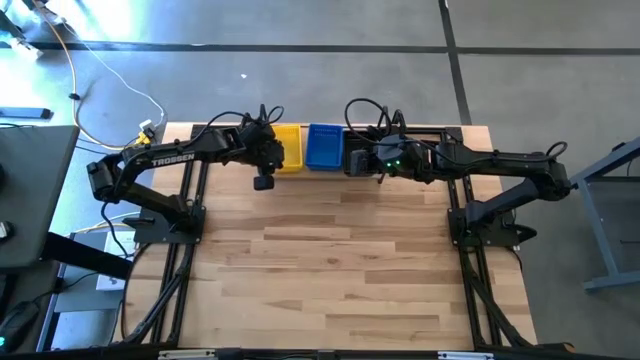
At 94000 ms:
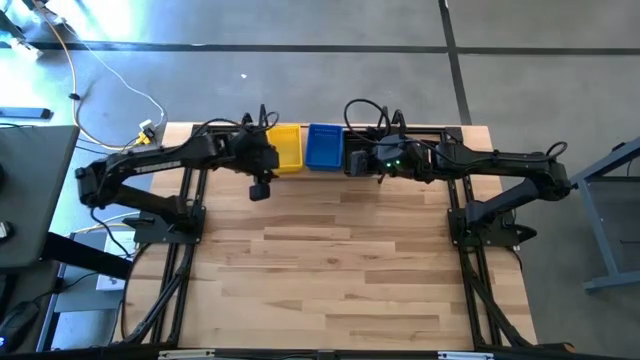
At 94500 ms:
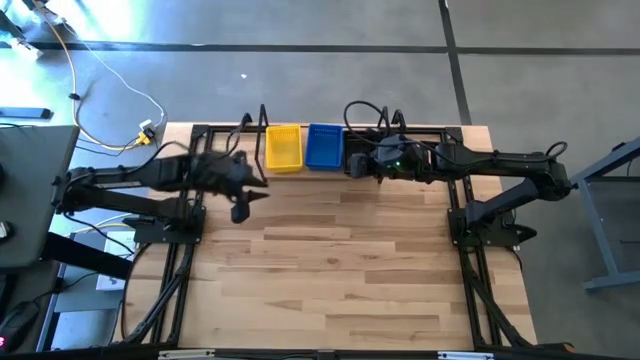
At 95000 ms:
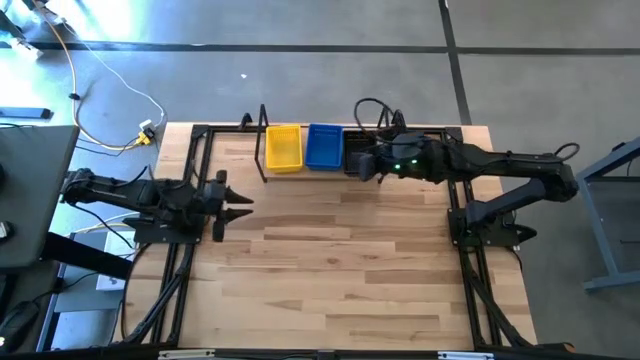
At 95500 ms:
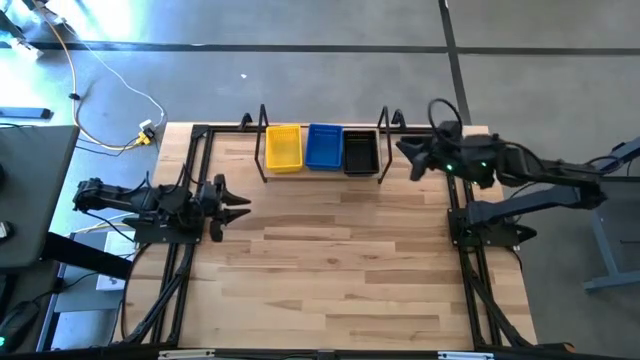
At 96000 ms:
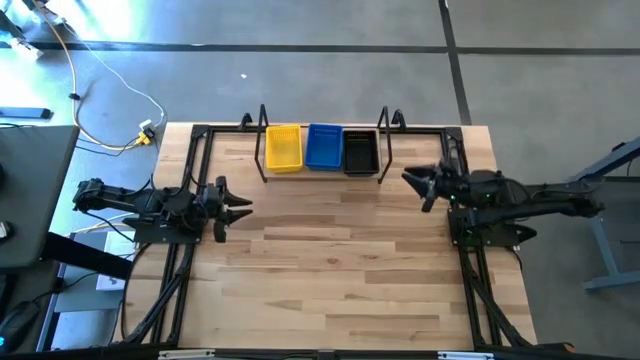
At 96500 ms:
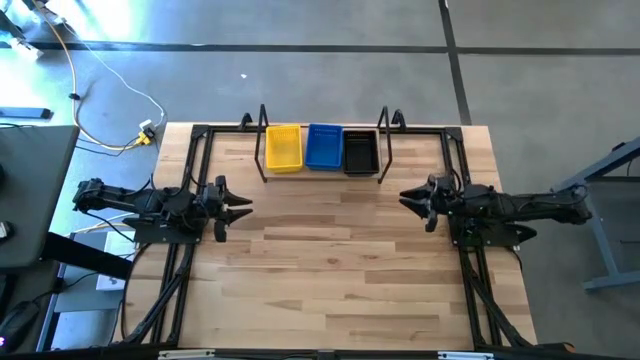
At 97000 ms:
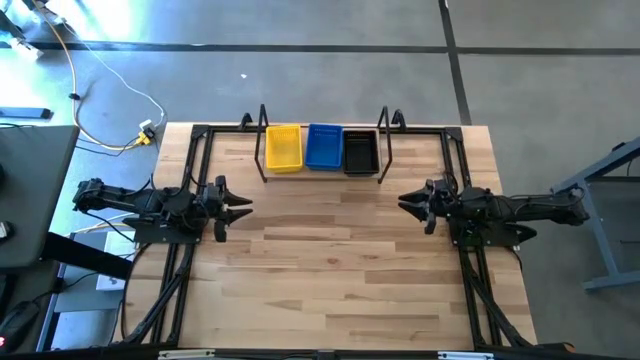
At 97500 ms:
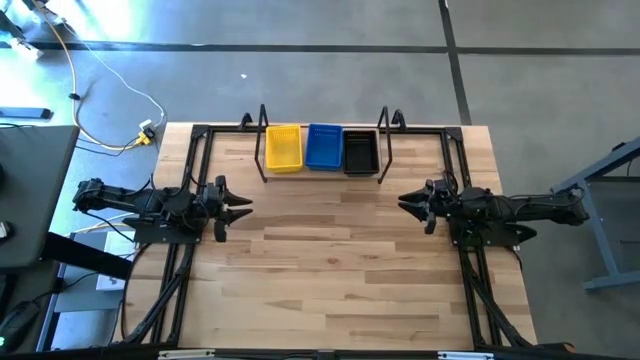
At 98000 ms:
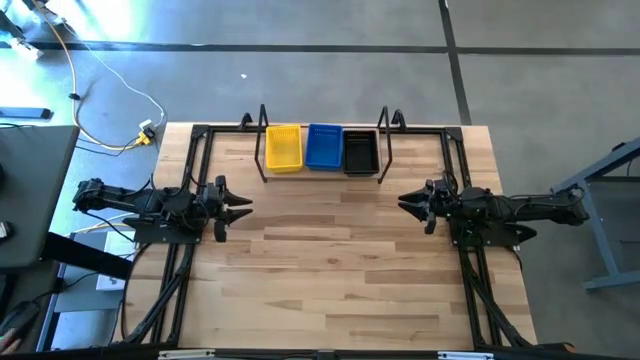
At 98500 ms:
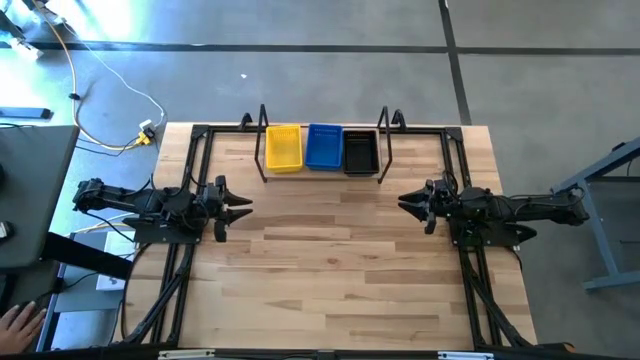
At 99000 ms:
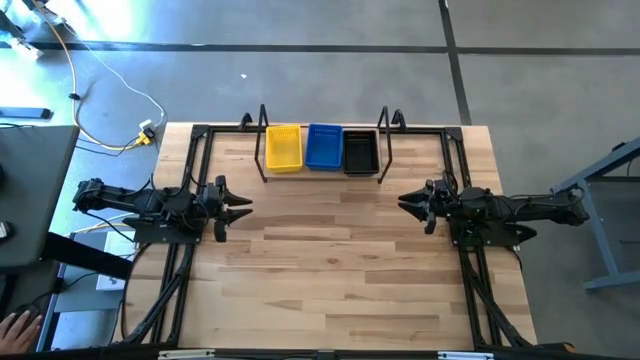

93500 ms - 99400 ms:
Task: Stack baskets on shelf by color
Return to Home Position

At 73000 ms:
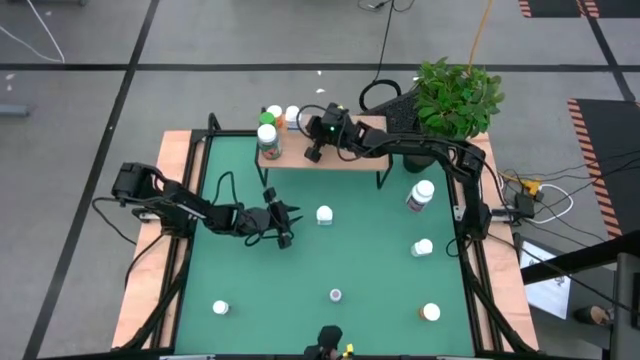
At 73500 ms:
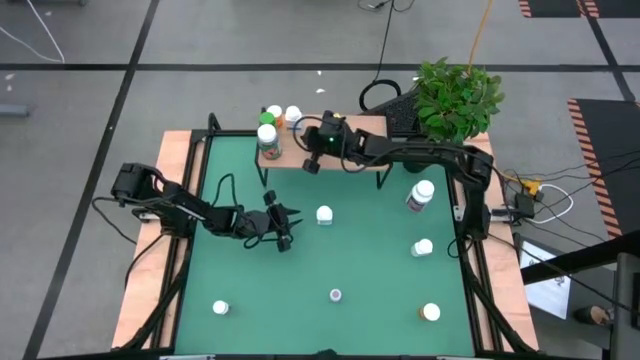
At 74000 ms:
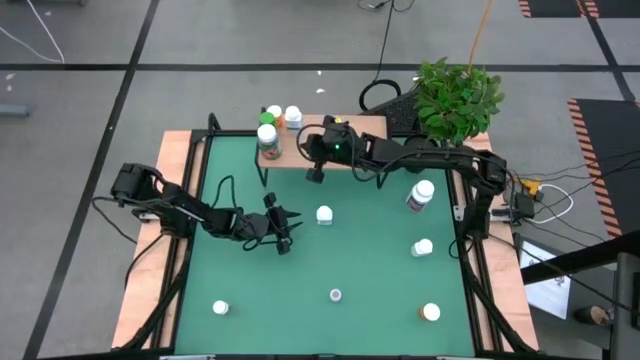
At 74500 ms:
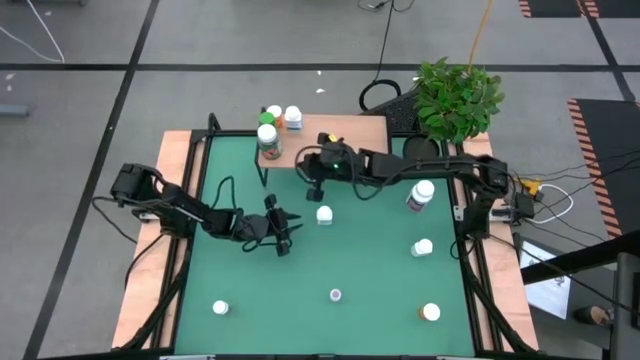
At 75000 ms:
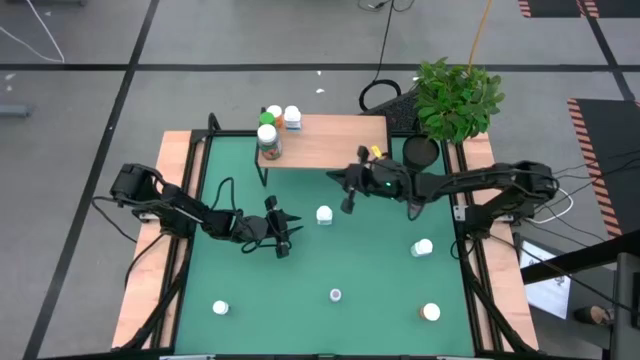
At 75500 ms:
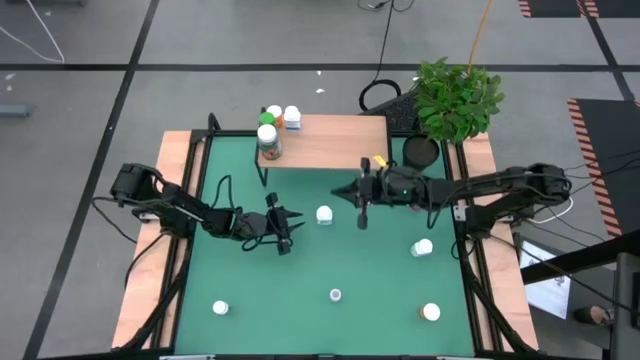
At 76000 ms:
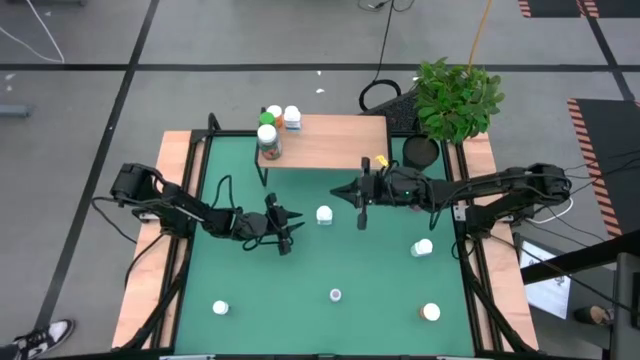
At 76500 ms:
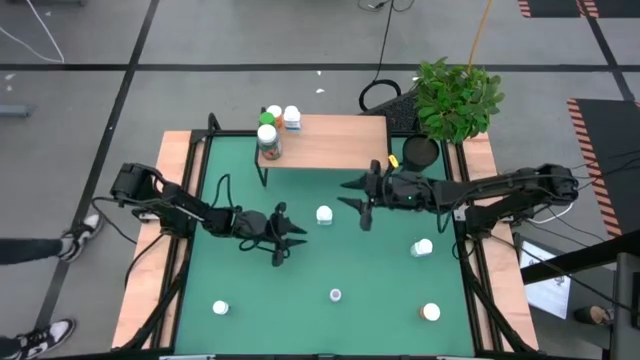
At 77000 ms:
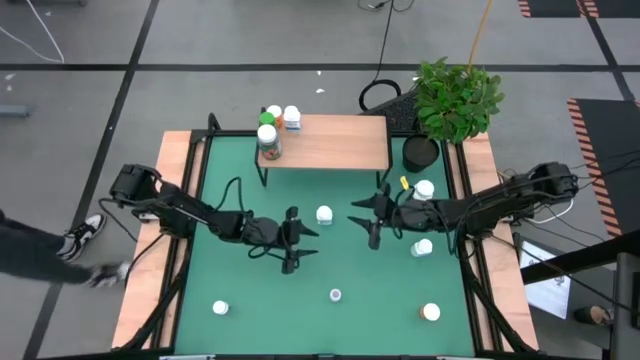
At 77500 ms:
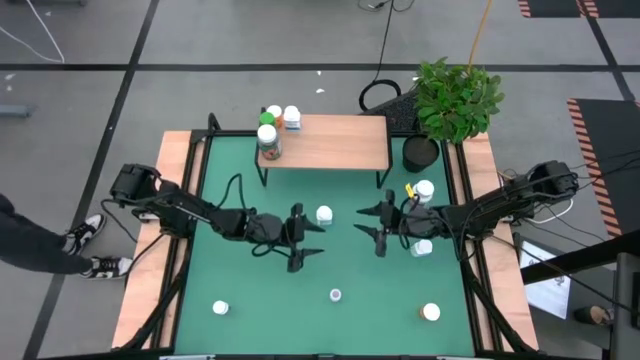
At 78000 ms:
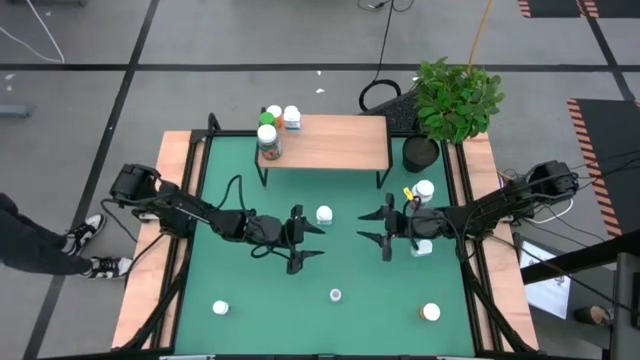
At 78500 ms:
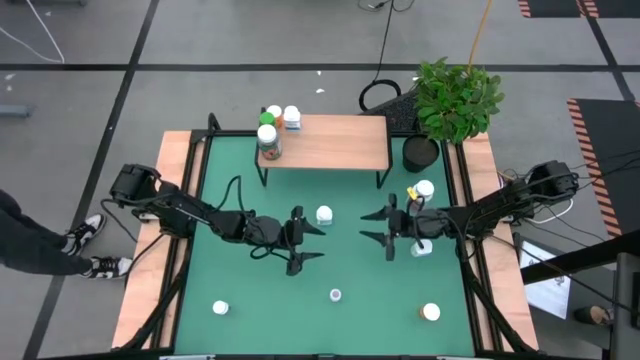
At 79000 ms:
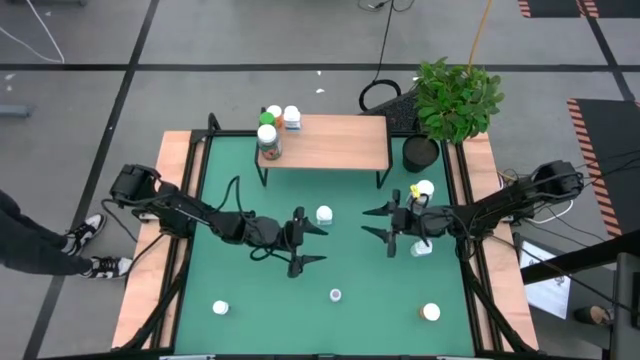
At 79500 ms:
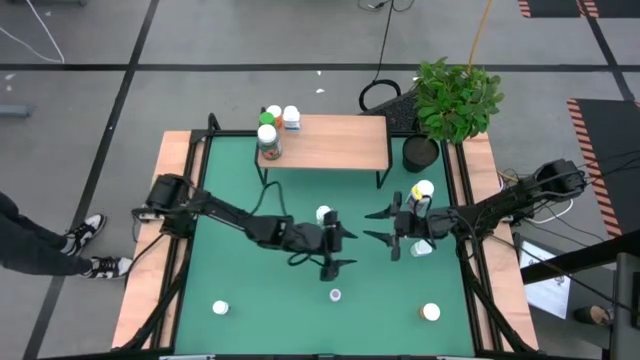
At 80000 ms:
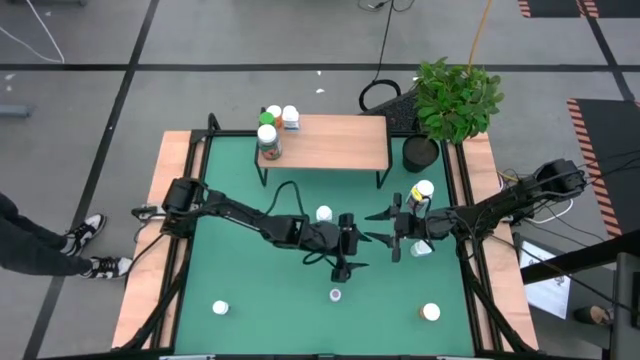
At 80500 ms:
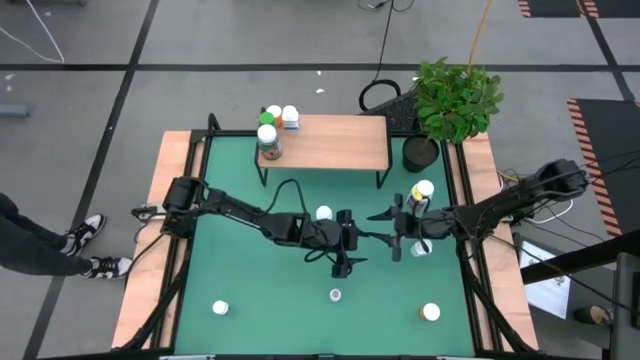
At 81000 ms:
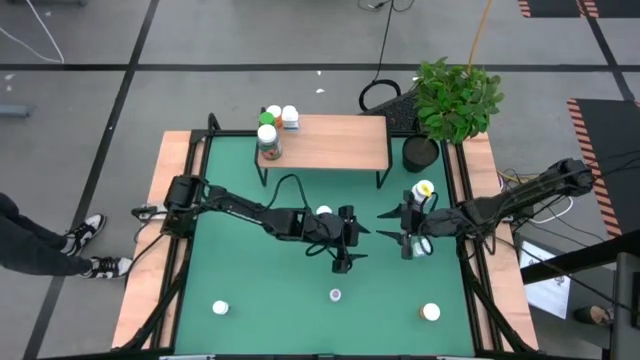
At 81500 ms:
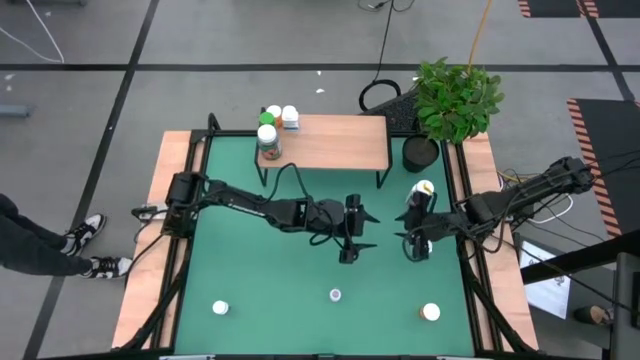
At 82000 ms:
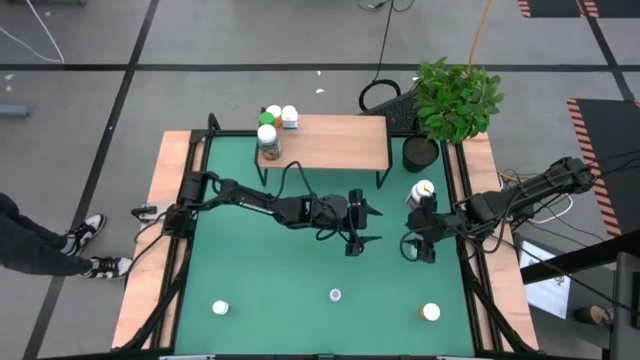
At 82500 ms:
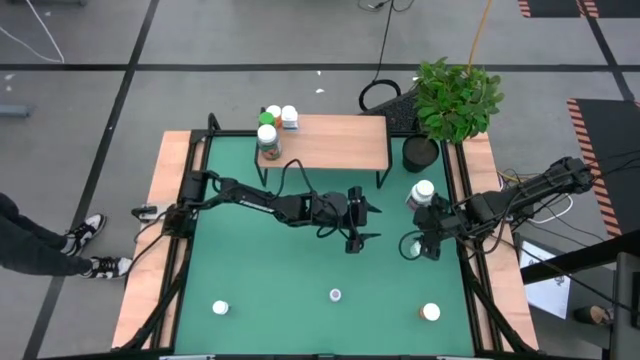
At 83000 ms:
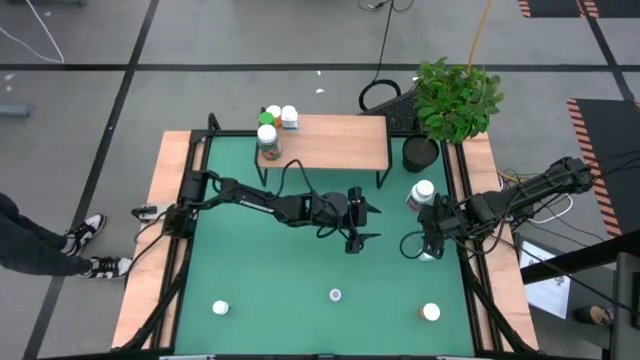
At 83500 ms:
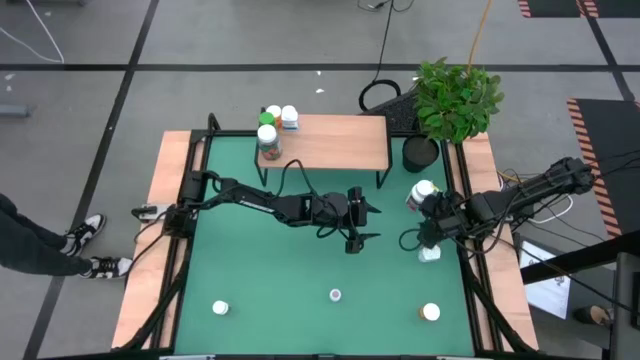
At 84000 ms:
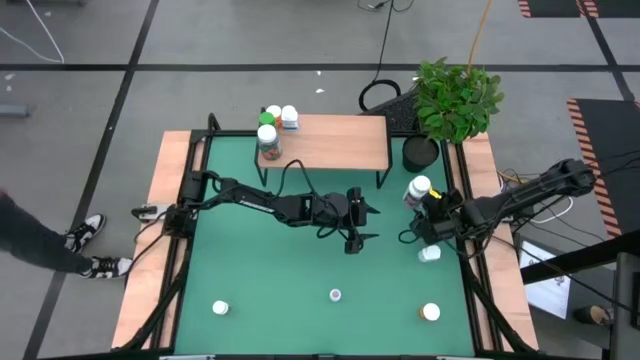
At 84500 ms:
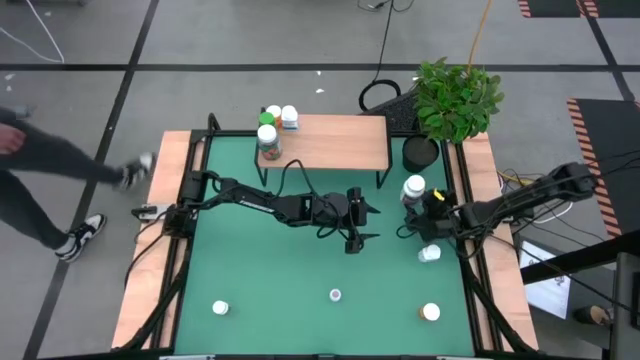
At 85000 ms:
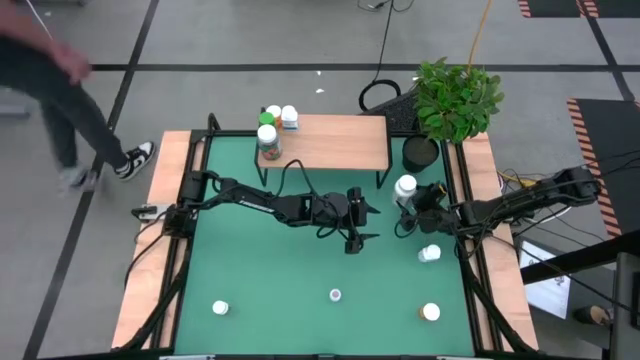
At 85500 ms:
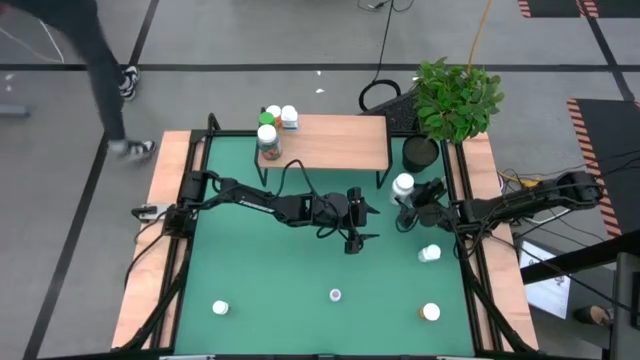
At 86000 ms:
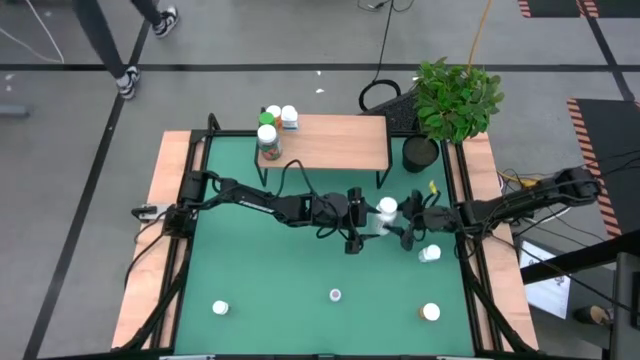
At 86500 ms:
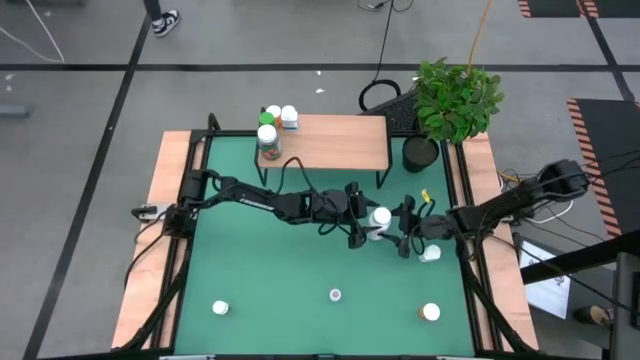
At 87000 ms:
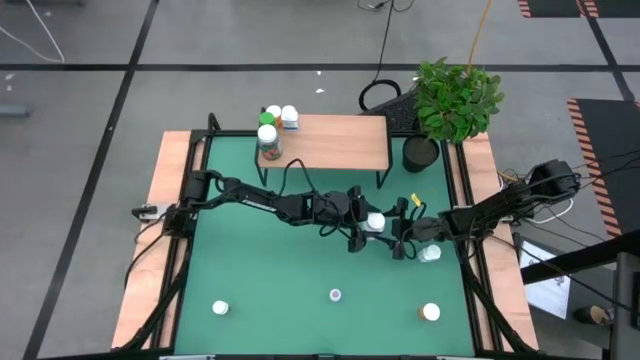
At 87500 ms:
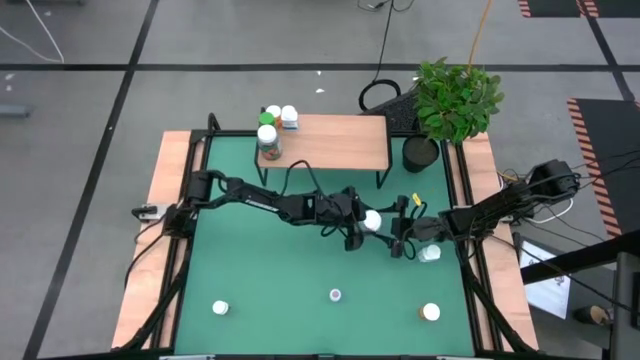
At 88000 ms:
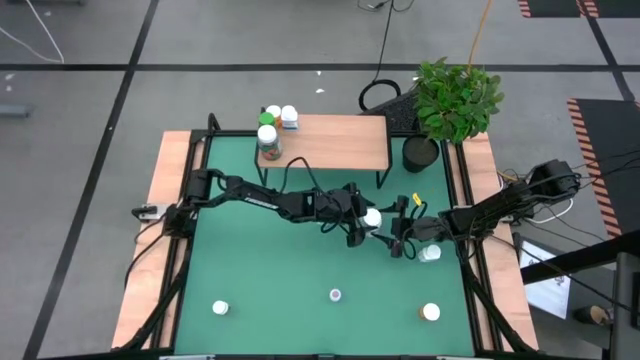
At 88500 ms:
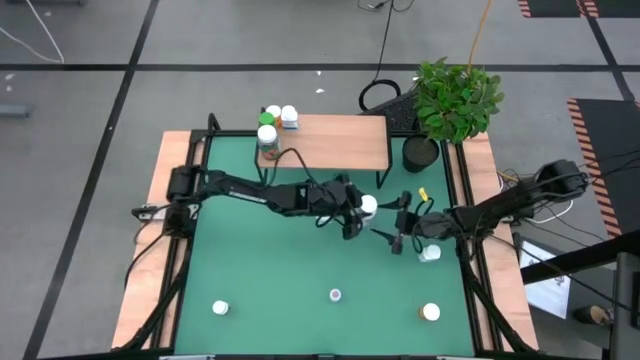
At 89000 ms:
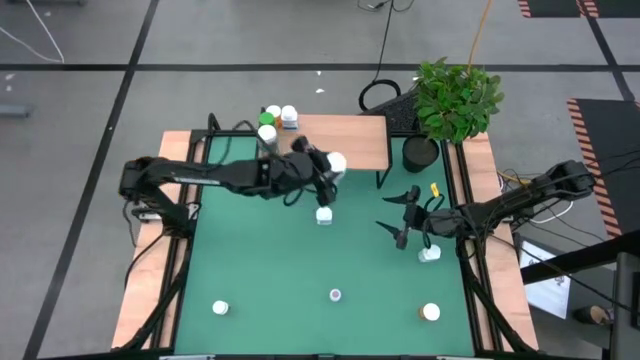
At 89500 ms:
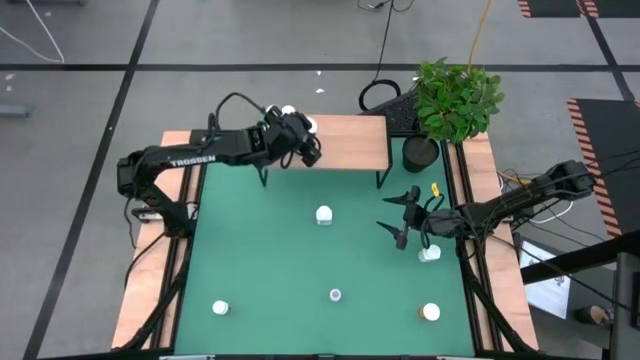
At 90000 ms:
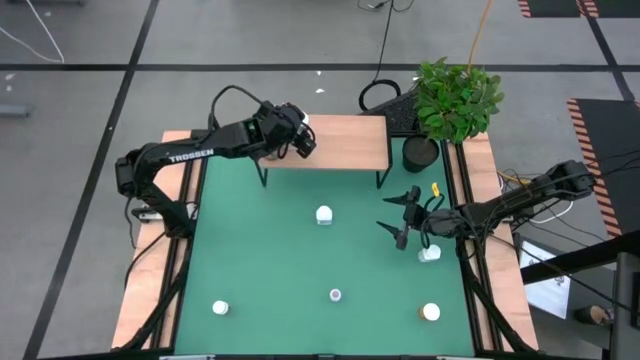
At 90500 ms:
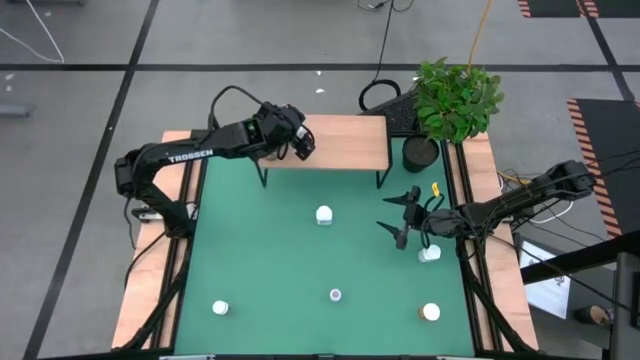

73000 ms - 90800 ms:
Task: Pick and place medicine bottles onto shelf by color
Put the violet bottle on the shelf
